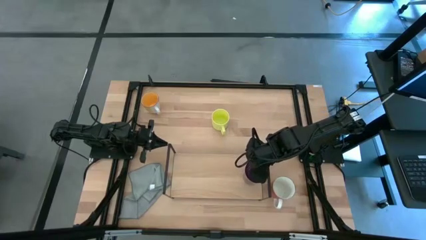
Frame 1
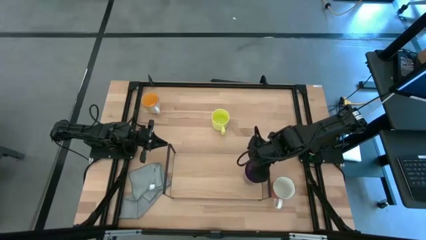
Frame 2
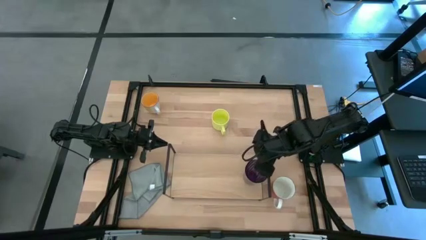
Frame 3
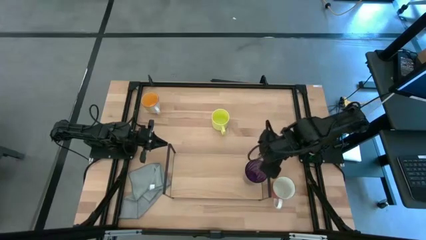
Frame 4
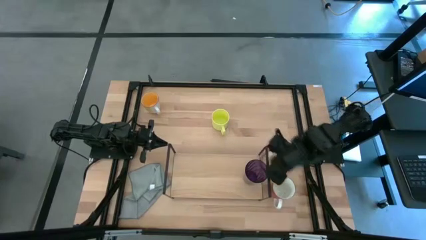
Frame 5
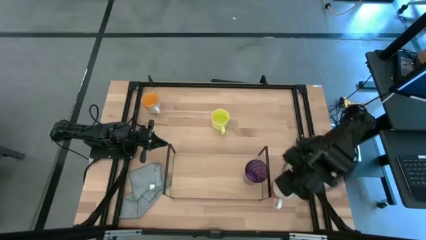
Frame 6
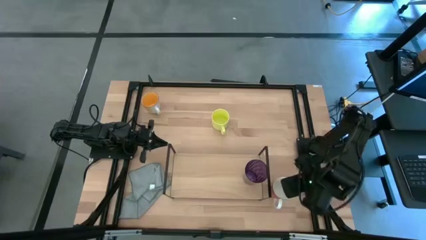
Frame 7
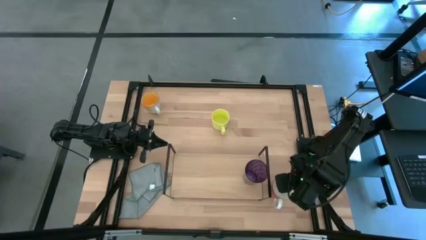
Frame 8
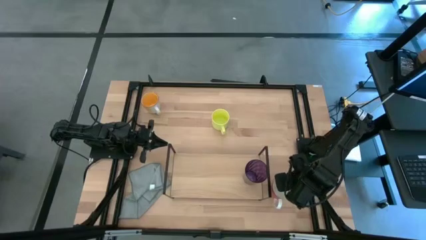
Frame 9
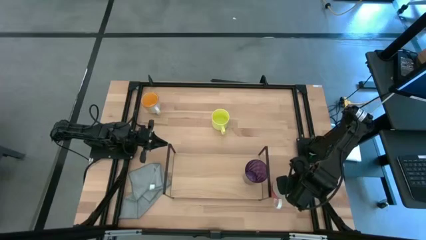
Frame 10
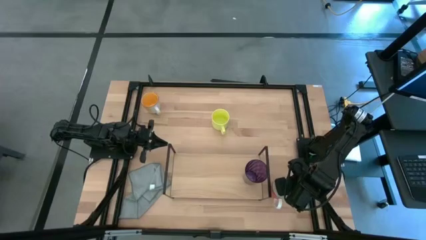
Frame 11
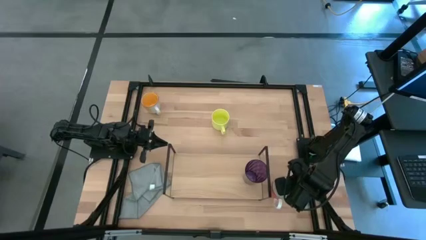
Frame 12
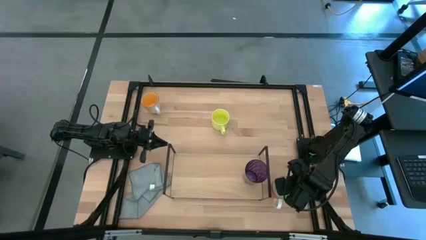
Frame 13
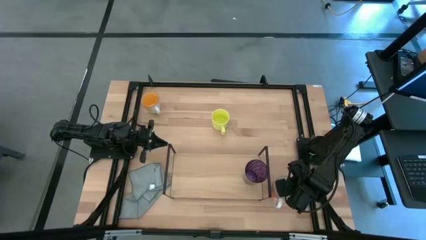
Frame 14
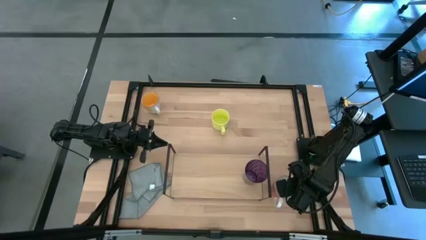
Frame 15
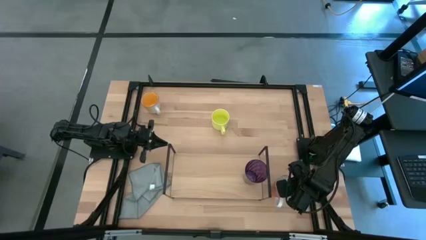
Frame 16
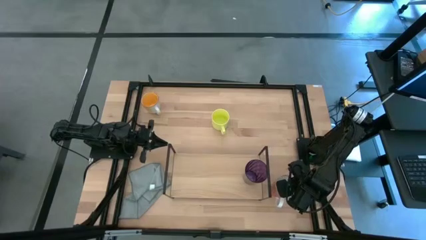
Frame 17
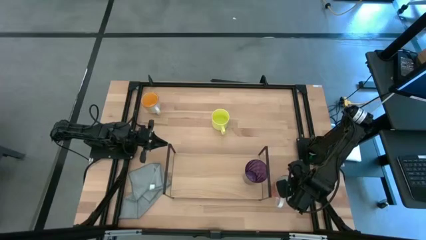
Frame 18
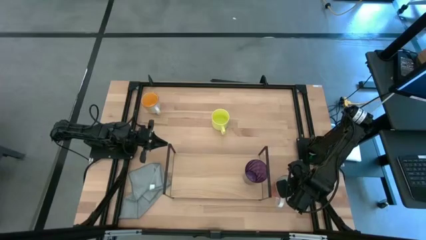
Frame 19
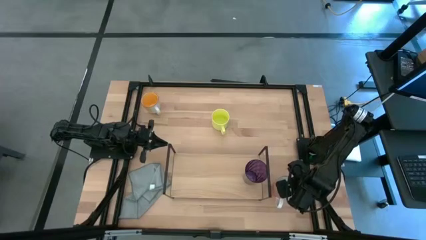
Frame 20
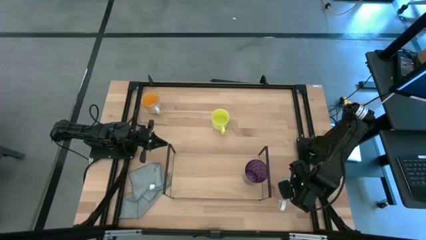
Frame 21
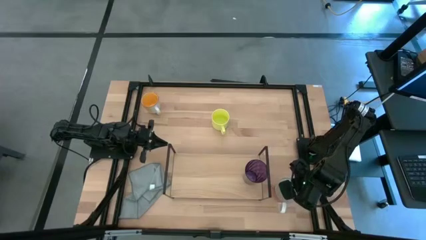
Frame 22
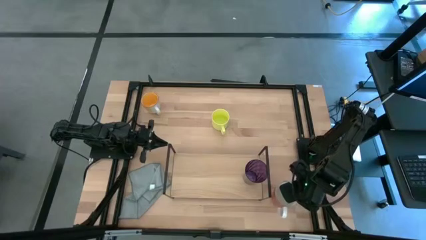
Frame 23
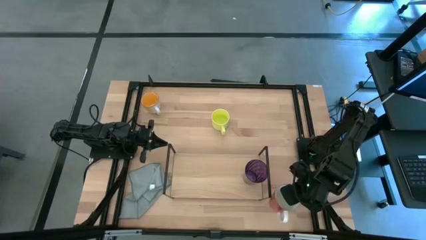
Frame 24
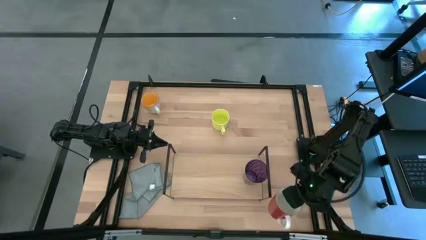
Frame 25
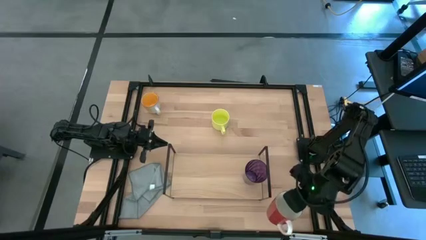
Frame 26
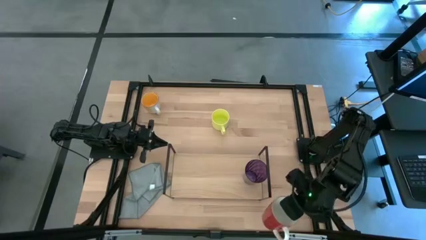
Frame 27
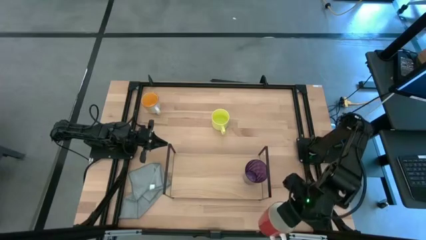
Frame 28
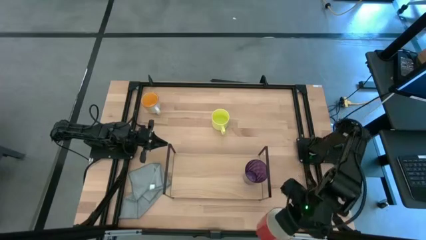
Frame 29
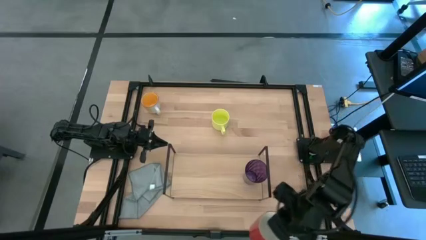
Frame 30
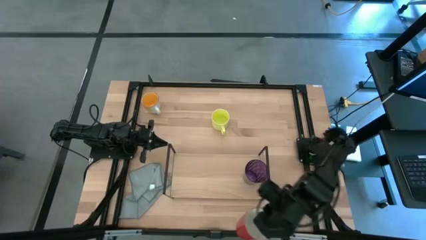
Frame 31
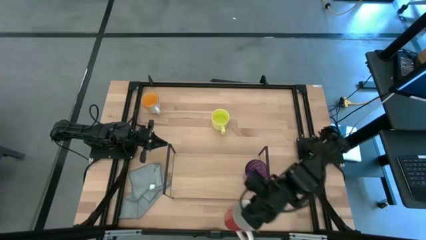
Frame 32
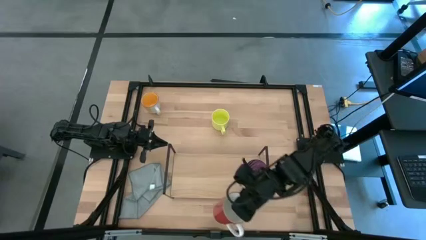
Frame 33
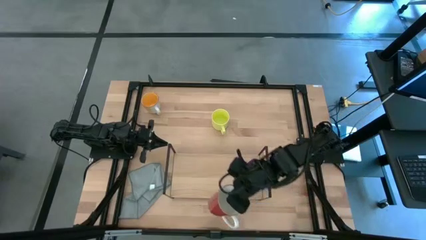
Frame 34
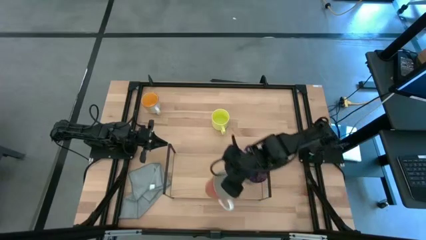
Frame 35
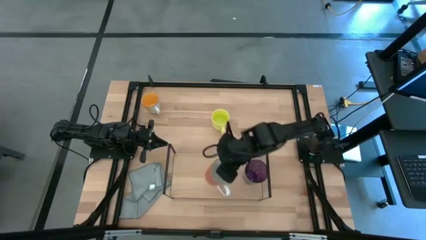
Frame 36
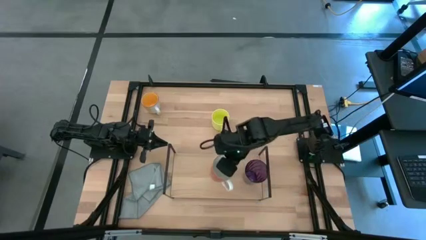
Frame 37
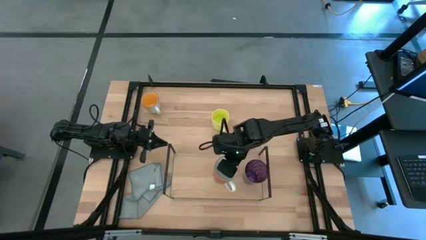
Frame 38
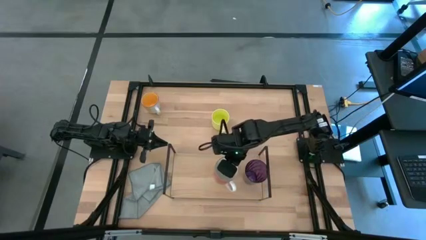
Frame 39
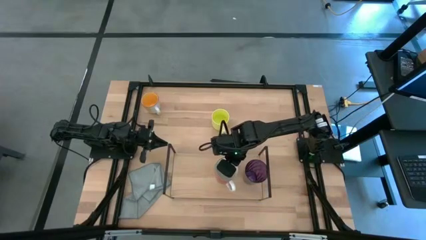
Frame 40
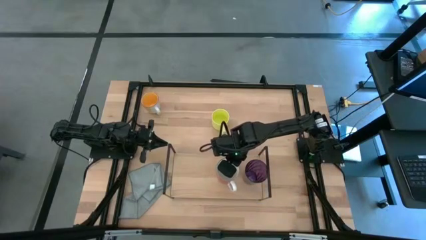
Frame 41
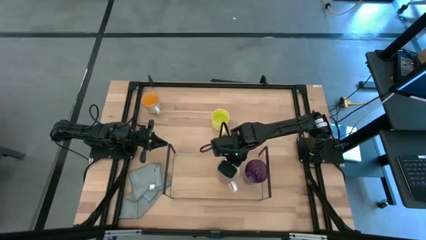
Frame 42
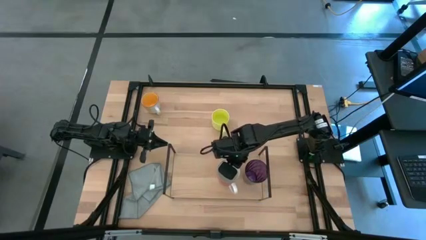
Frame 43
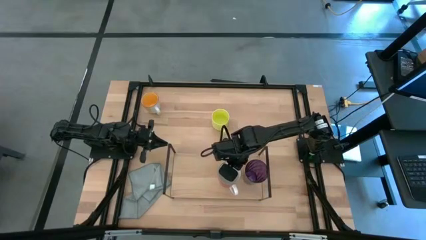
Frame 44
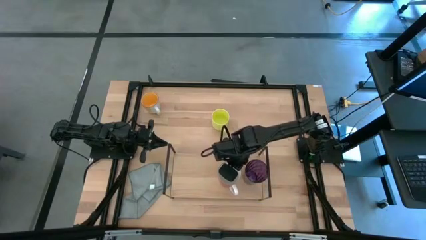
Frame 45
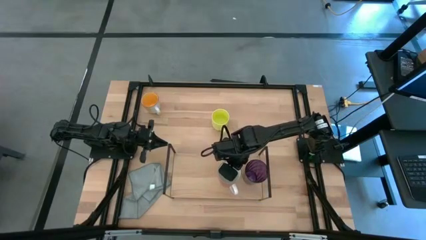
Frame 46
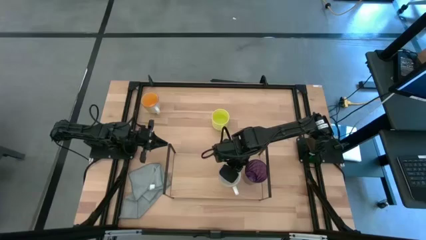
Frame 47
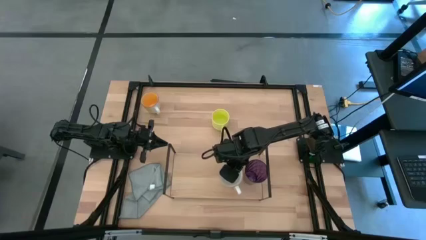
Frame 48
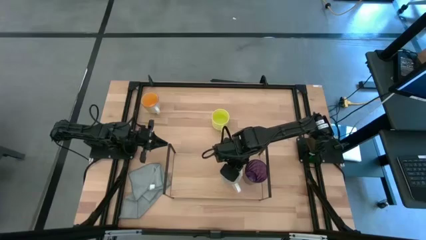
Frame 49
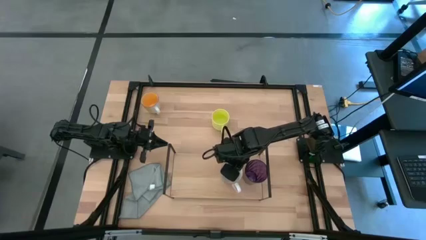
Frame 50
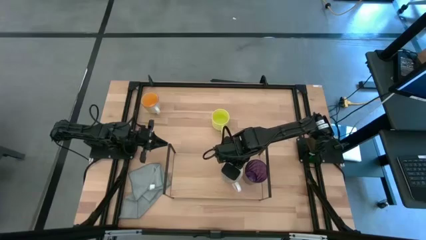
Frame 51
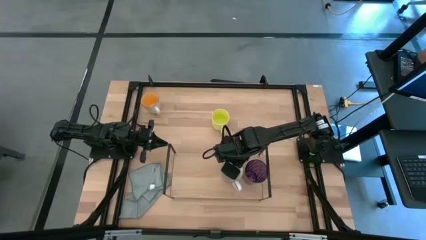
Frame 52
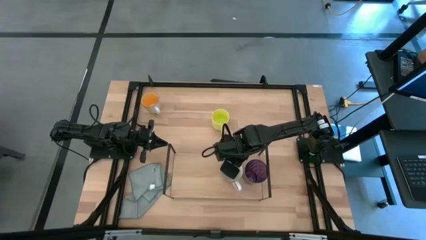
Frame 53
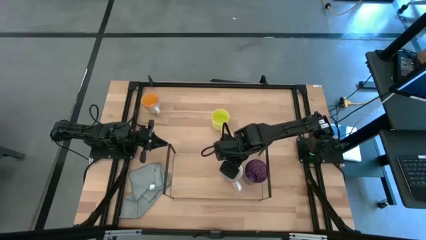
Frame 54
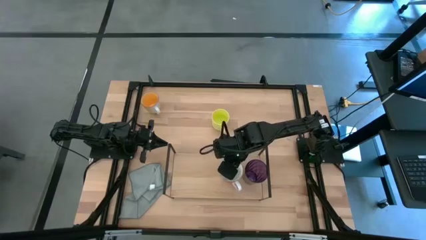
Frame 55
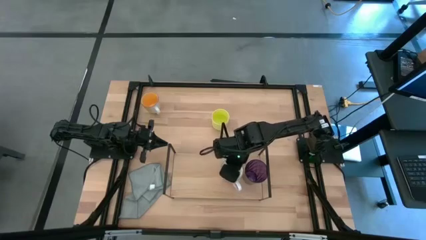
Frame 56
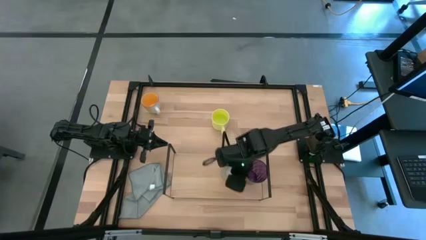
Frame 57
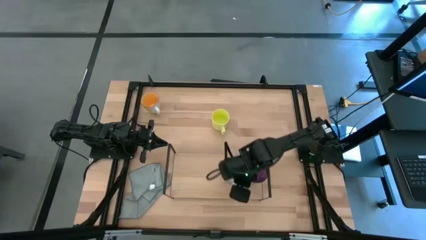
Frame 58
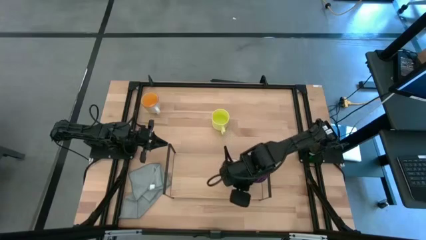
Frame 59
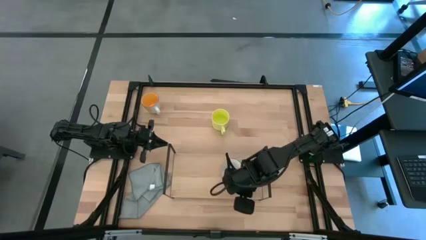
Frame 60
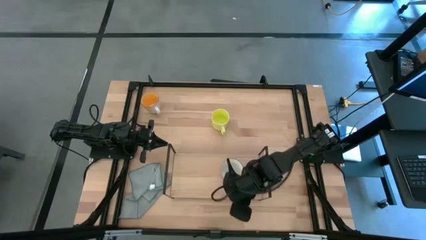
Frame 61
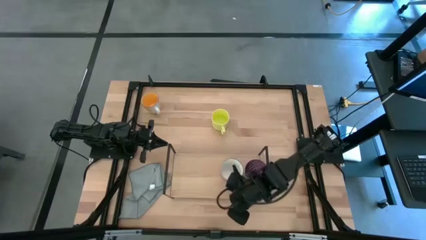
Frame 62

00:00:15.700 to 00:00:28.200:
Task: Stack small to large cups/mugs on shelf
Put the orange mug on the shelf

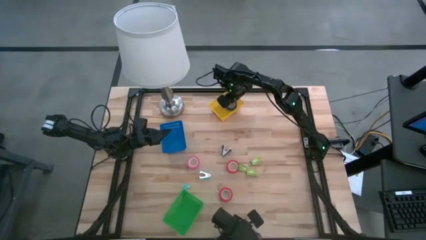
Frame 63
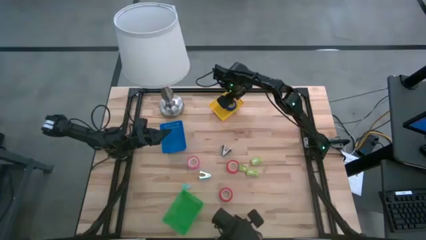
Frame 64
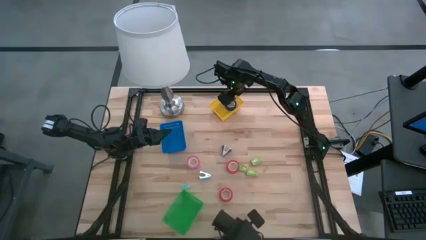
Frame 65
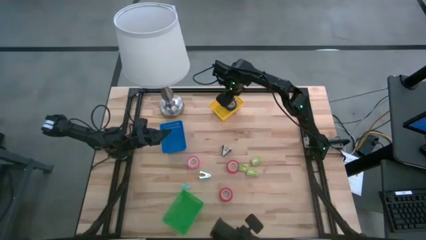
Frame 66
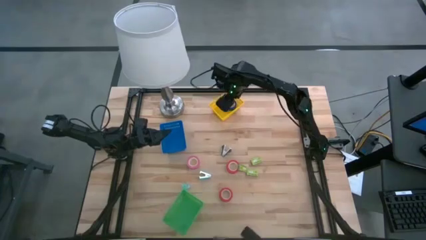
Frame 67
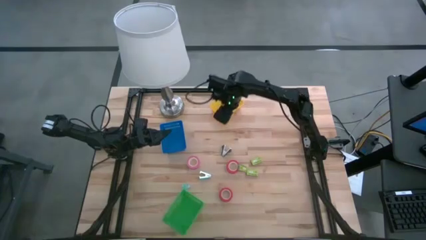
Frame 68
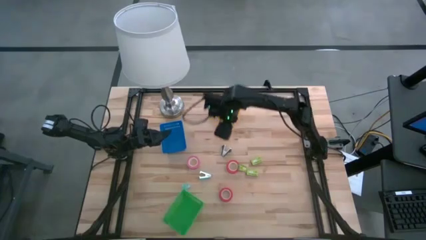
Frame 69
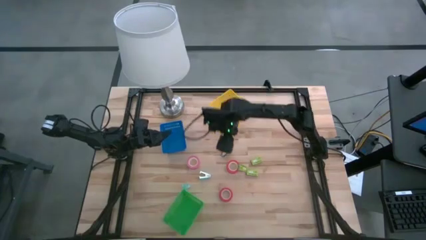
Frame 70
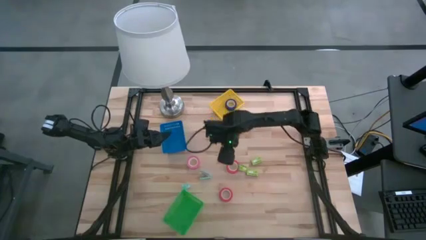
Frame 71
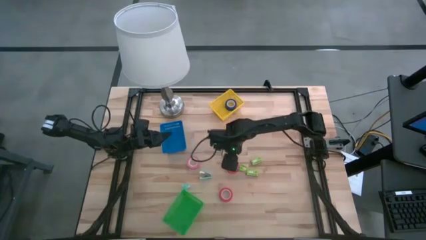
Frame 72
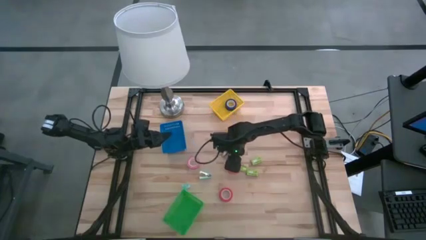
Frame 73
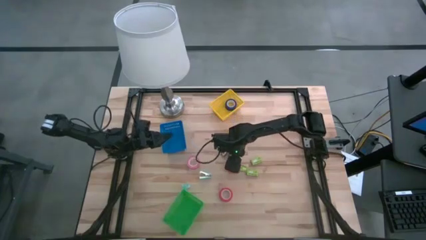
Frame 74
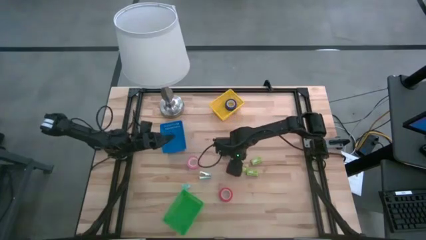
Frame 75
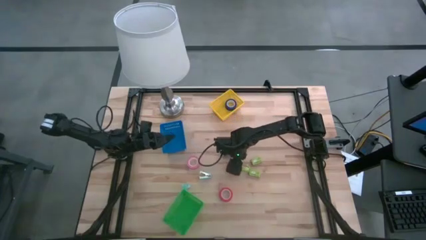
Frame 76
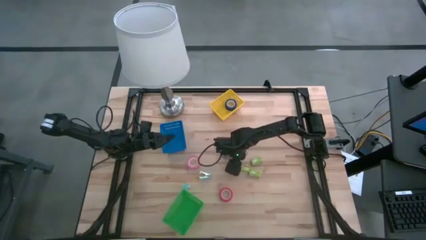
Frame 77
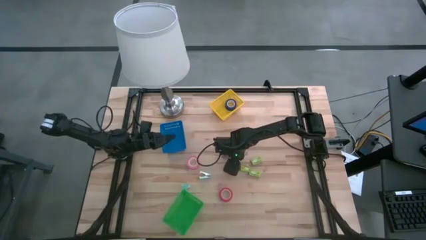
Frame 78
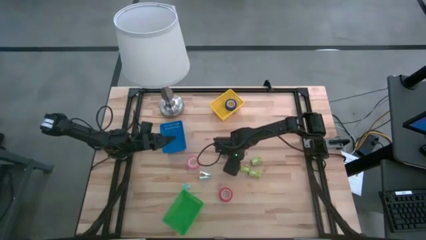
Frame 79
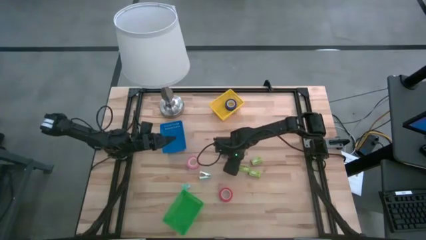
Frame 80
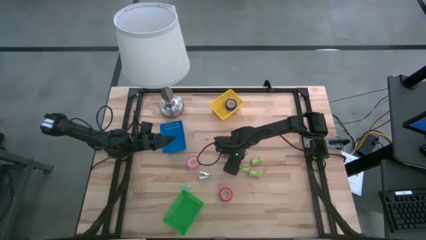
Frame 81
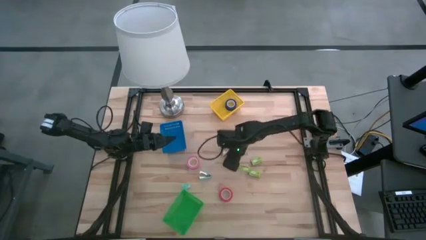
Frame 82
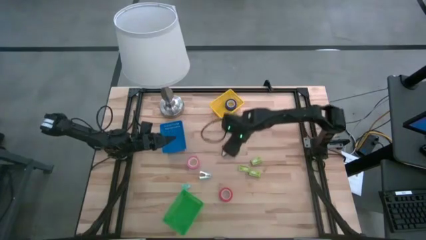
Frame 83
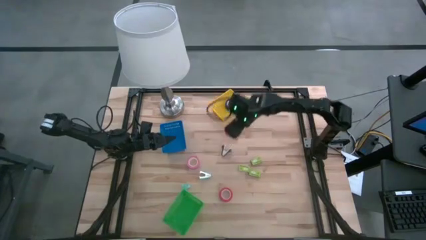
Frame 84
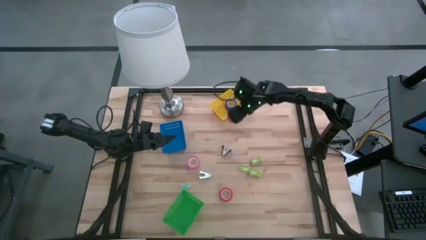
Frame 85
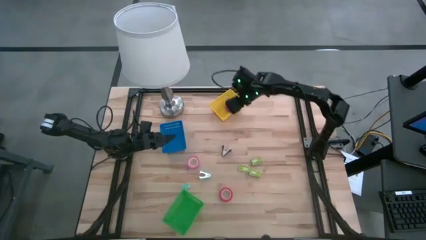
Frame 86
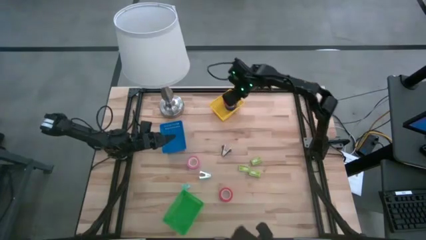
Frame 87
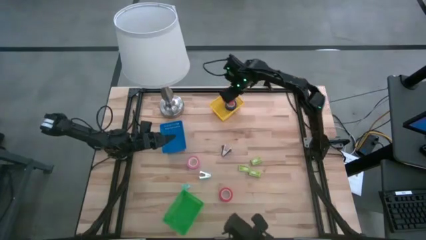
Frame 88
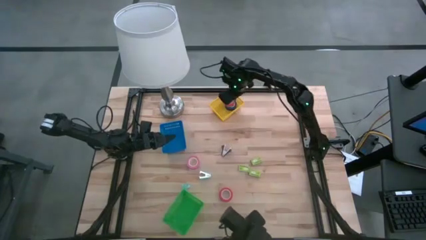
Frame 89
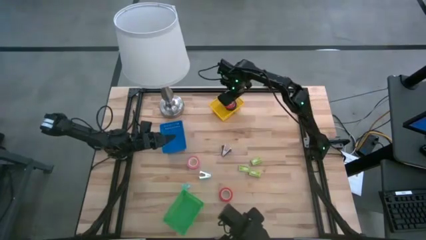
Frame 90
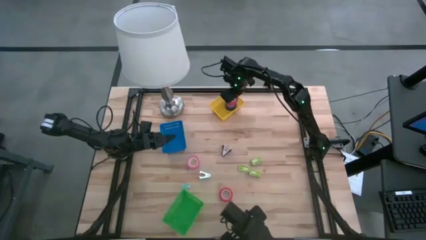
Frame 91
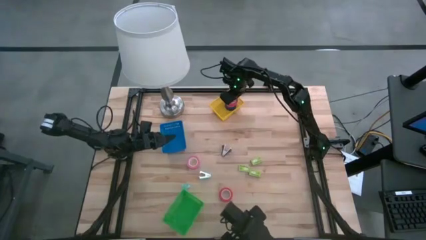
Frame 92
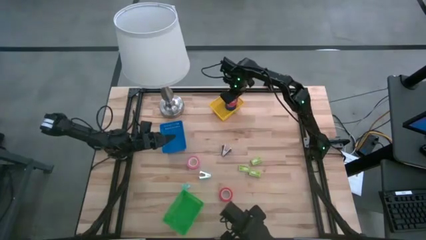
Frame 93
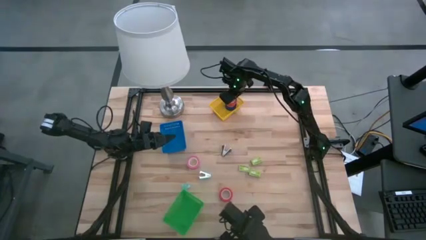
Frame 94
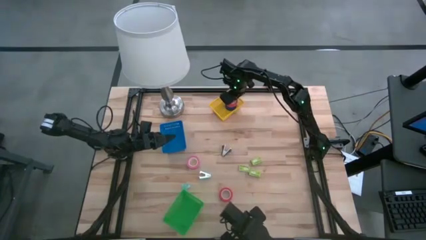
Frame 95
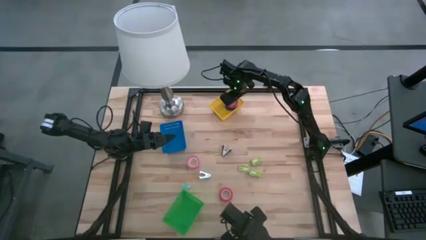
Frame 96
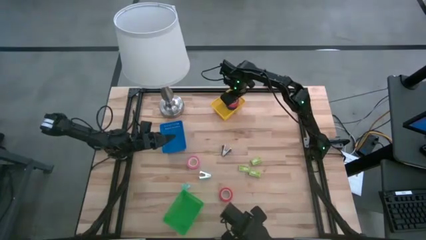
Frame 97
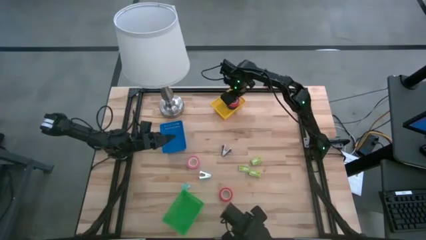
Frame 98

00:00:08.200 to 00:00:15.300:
Task: Pick and place Stapler, Stapler remover, tape
Put the top red tape into the yellow bin
